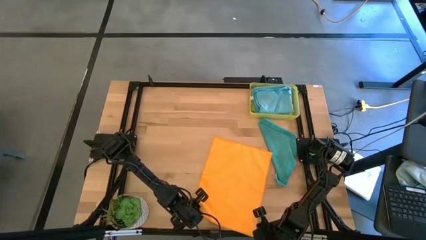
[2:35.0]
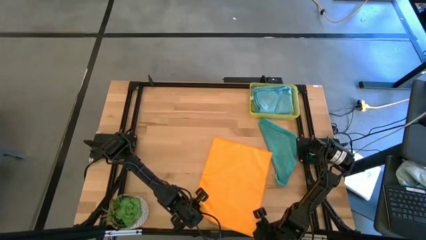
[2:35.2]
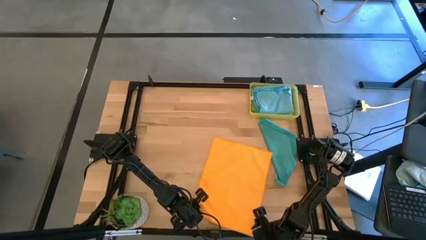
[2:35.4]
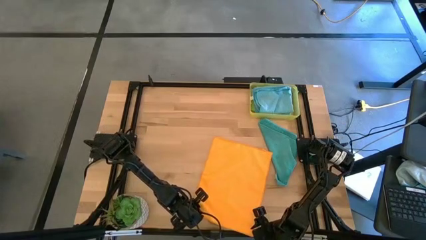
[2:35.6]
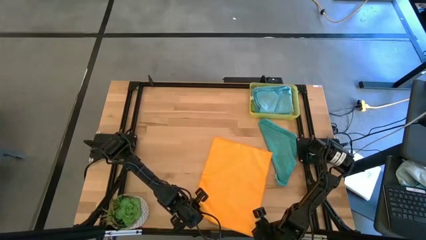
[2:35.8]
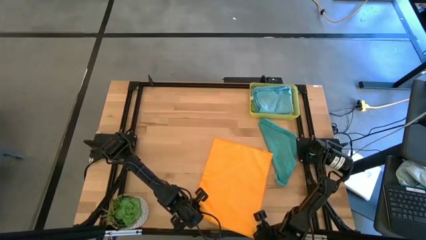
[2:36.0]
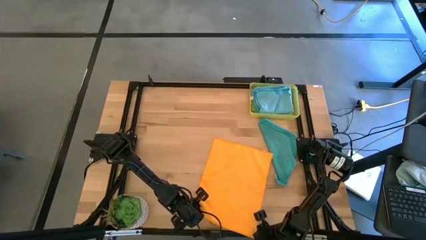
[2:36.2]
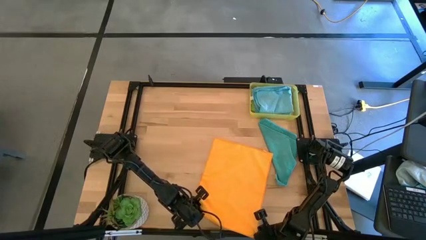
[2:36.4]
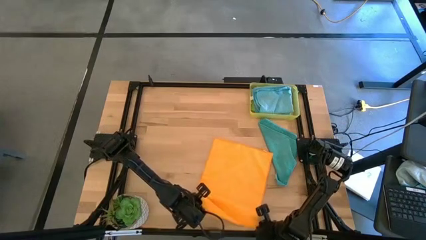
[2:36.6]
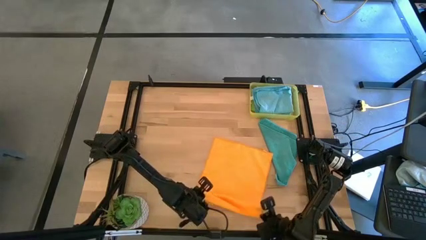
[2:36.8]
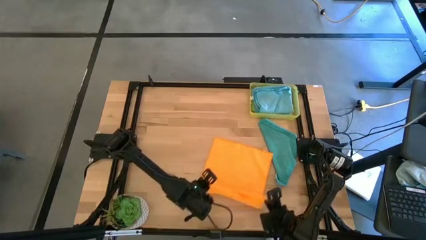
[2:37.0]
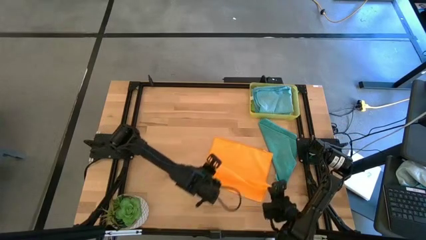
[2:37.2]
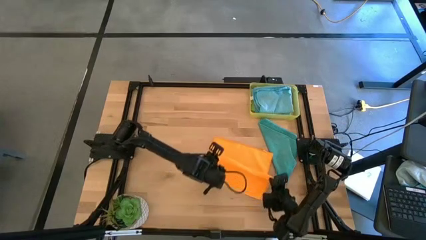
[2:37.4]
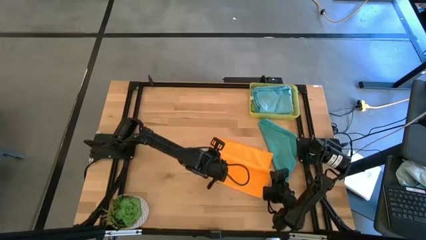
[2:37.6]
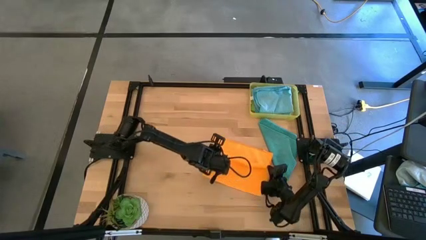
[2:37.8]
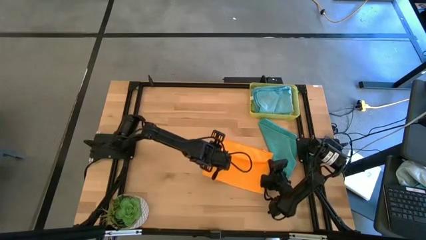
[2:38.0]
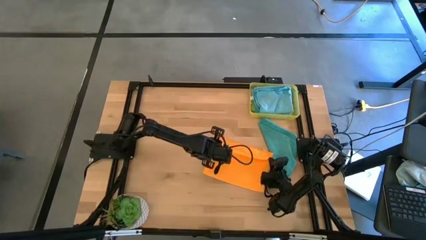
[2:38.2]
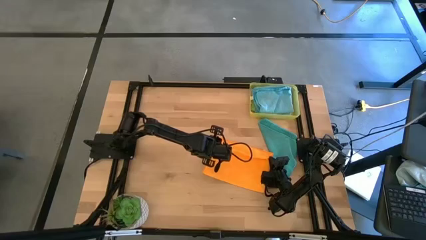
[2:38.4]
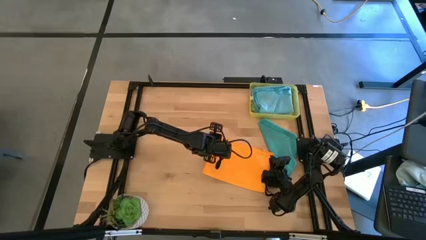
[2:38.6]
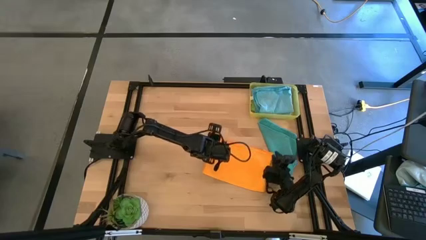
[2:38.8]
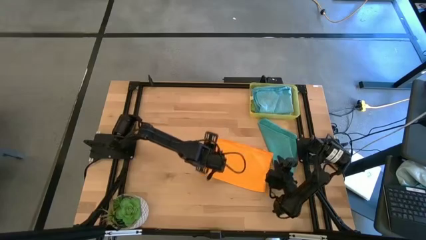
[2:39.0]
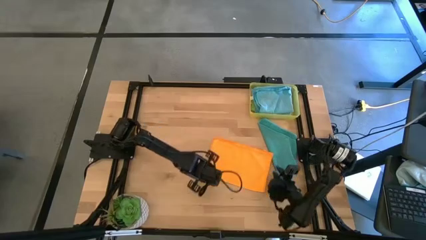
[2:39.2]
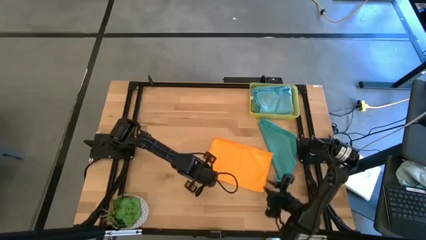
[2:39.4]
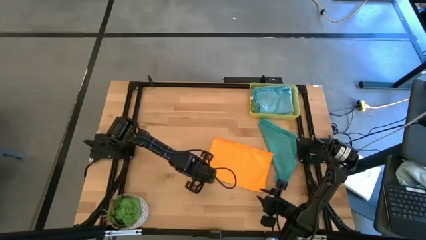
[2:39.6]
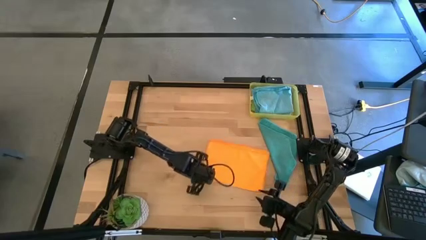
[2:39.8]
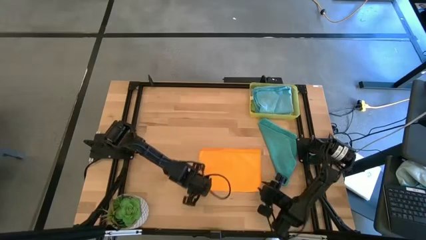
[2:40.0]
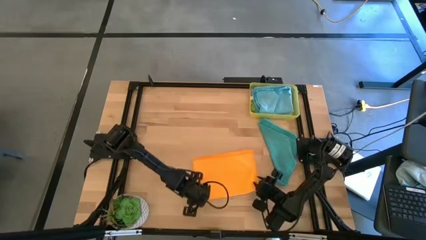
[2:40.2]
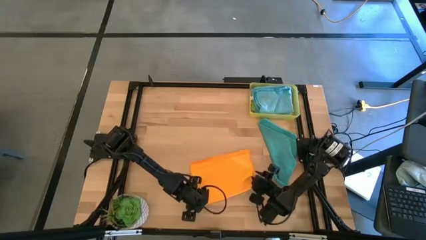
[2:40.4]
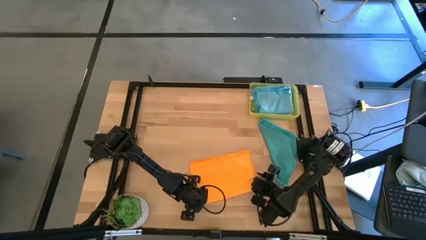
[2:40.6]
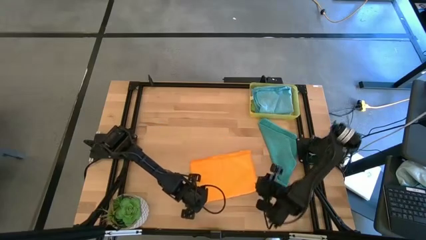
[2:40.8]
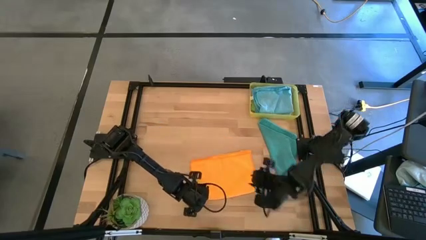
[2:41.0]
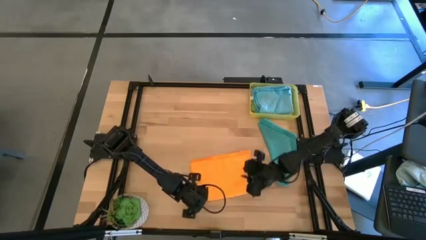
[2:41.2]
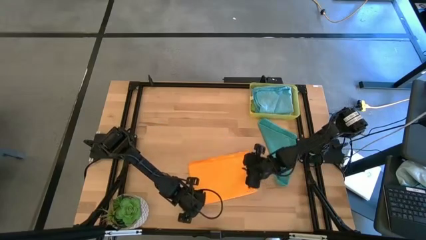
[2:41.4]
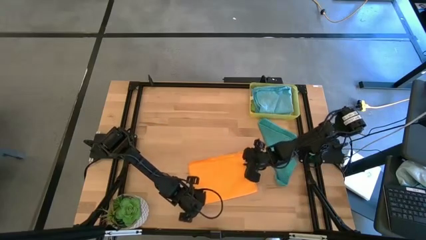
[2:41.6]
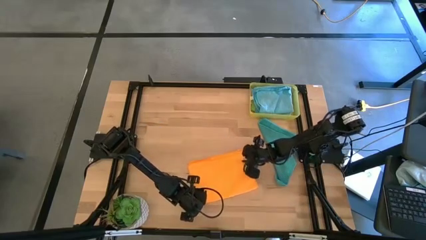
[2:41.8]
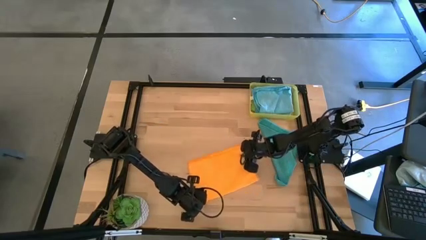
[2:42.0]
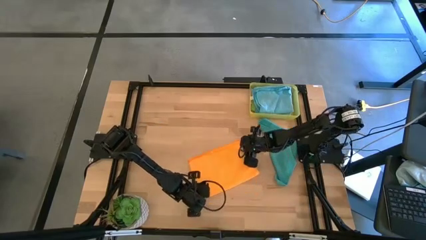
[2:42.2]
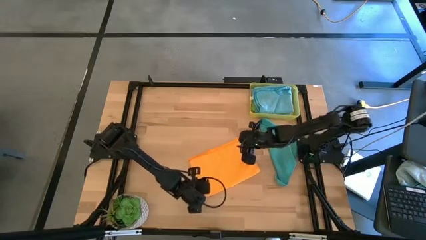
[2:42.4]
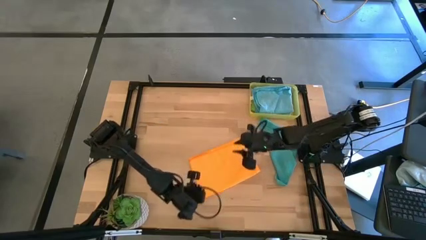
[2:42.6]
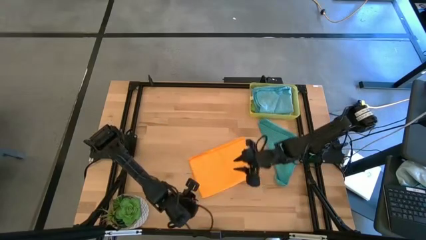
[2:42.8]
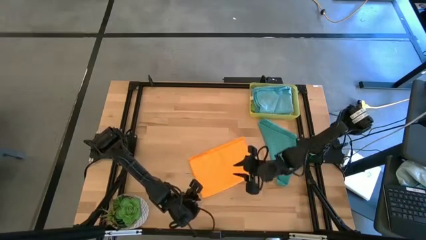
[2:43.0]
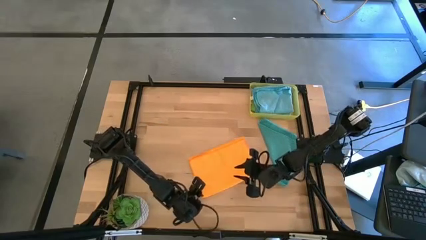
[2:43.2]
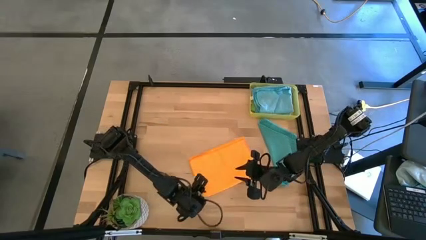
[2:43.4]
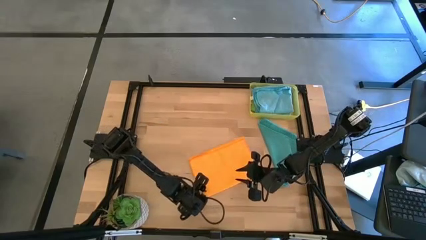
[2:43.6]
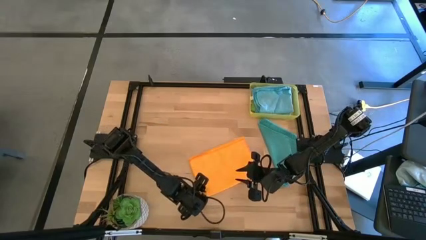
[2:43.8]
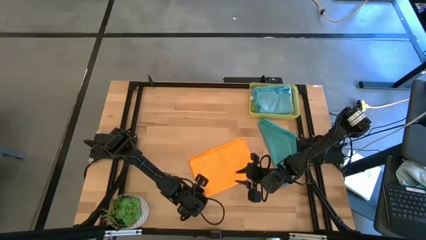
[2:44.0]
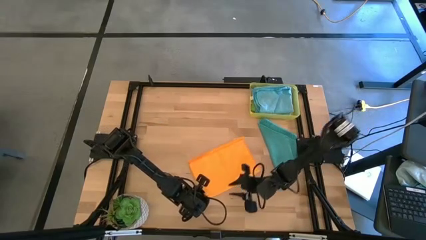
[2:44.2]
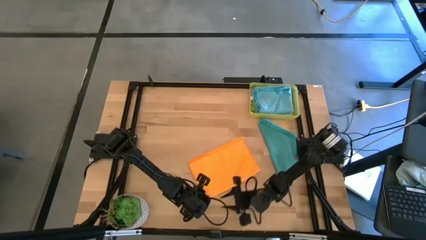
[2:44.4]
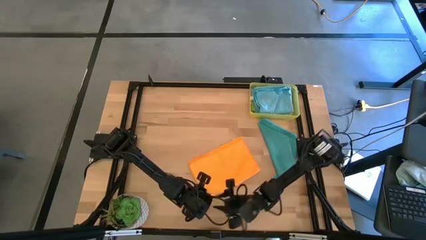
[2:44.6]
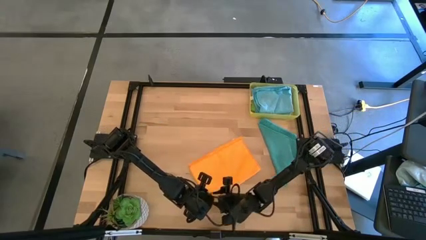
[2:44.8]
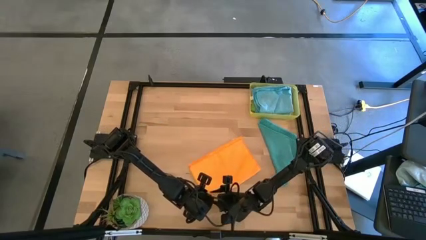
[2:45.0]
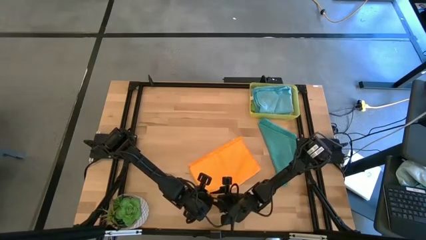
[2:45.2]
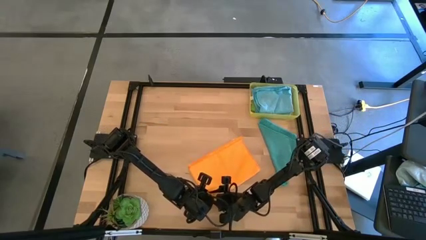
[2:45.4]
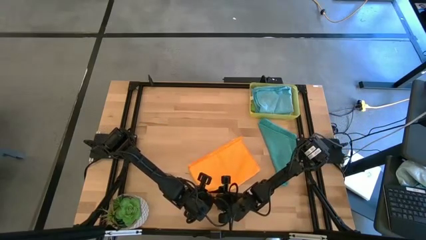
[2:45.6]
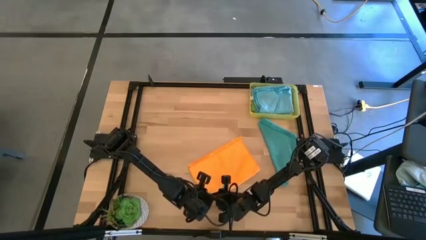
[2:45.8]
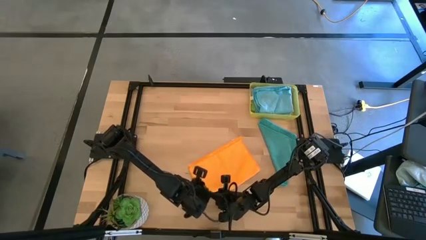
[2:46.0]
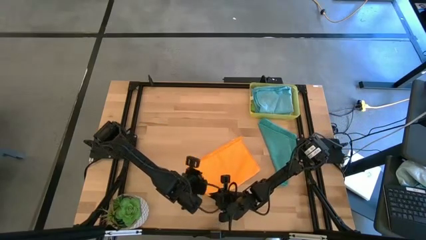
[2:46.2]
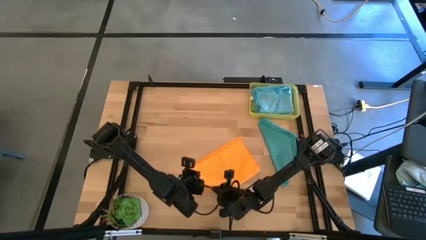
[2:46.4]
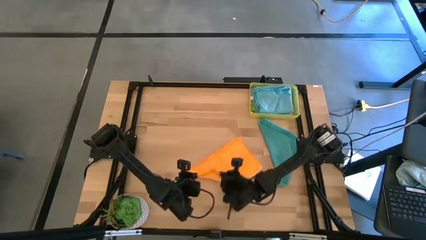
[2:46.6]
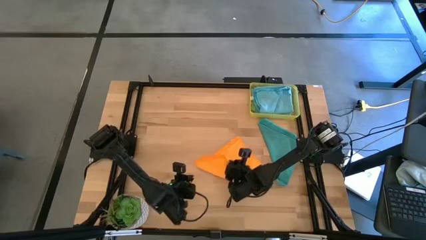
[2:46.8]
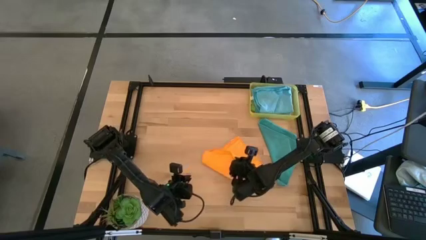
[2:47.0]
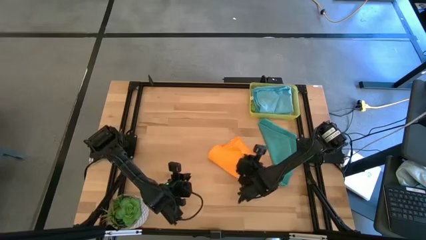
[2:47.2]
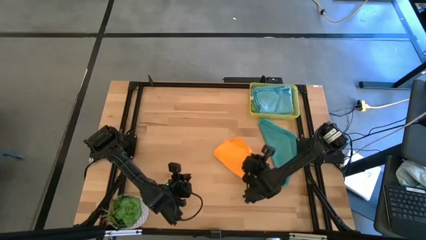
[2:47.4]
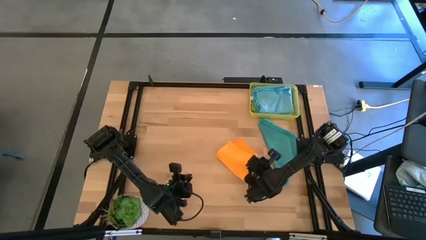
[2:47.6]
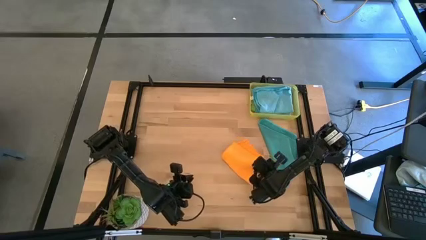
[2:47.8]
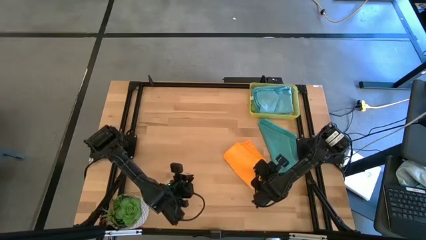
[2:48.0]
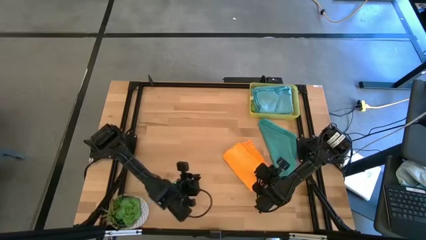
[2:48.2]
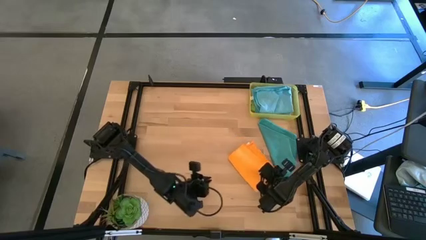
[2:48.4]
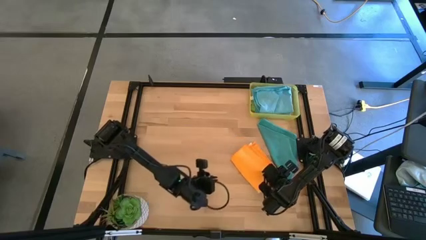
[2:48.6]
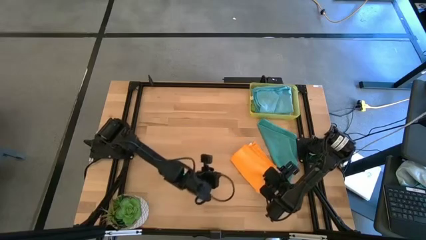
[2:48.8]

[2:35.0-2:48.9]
Task: Fold microfiber towels
Fold the yellow microfiber cloth
